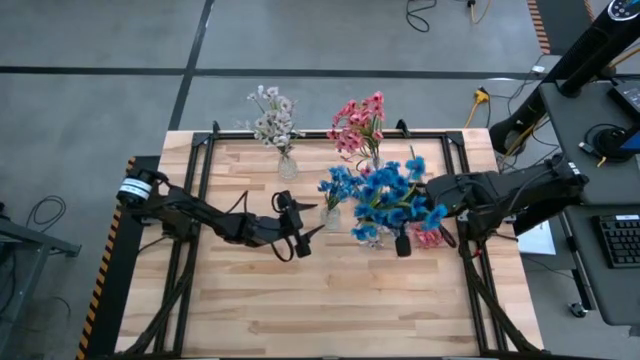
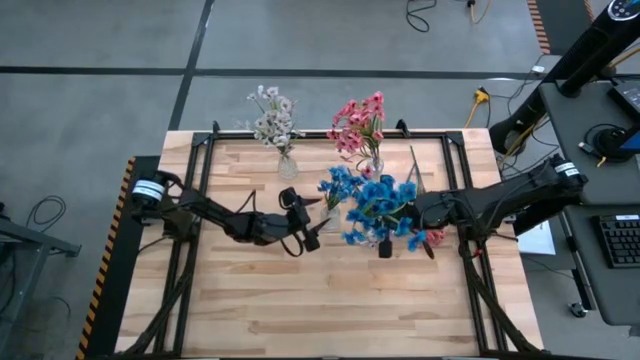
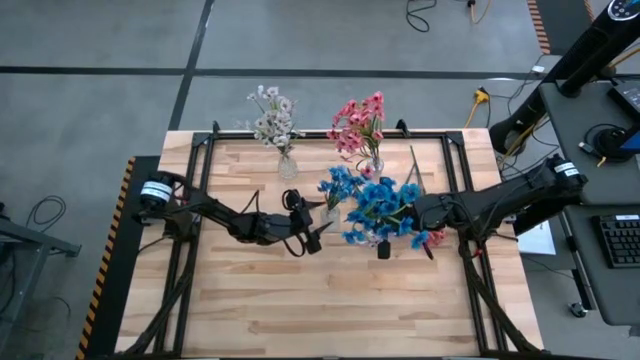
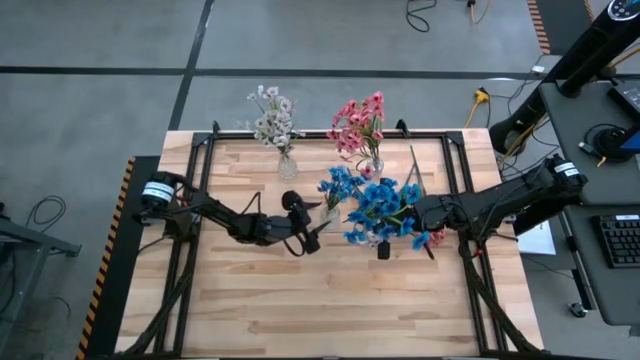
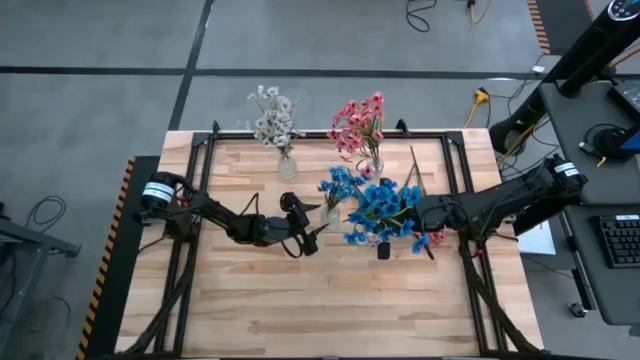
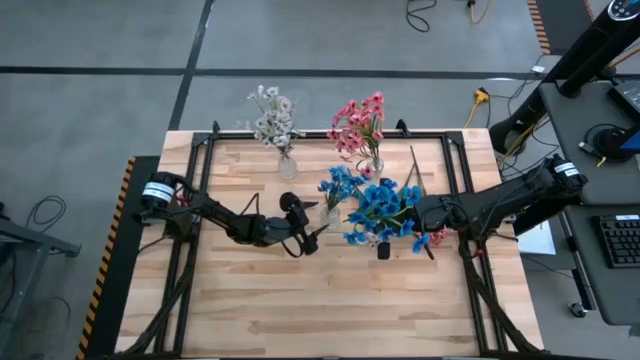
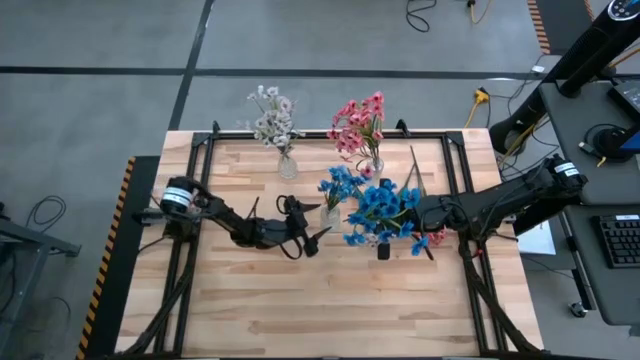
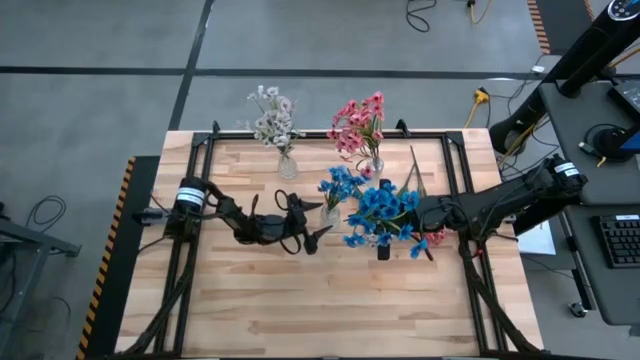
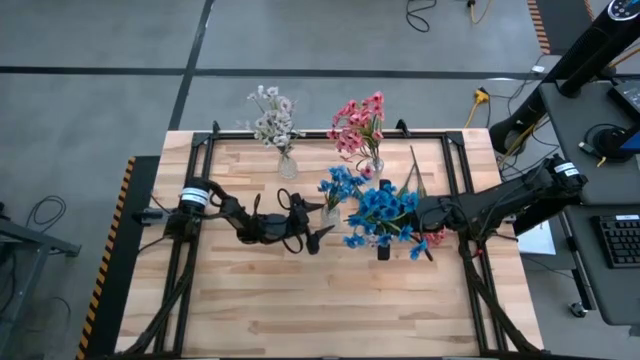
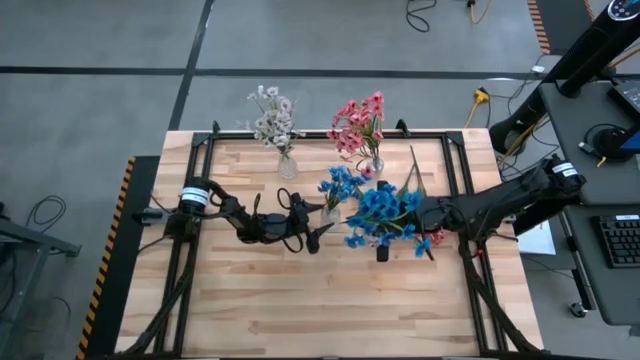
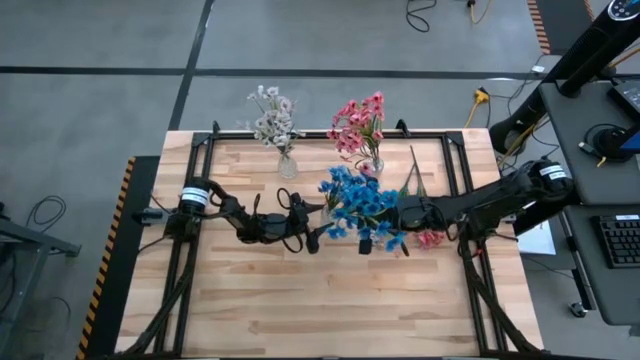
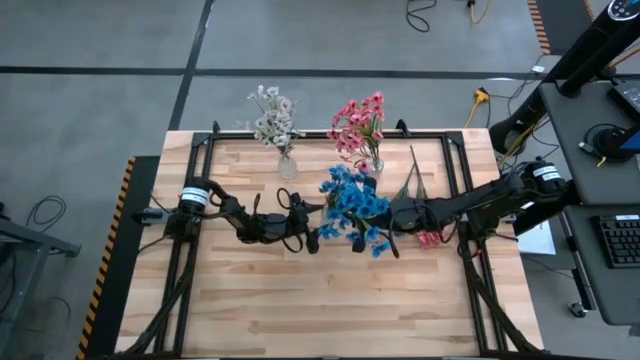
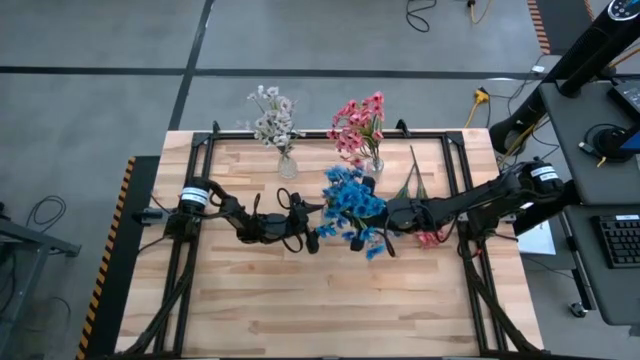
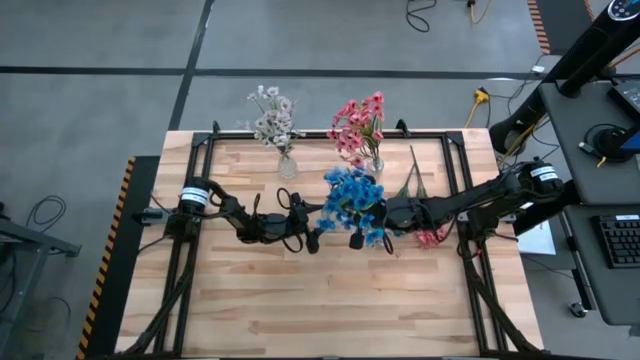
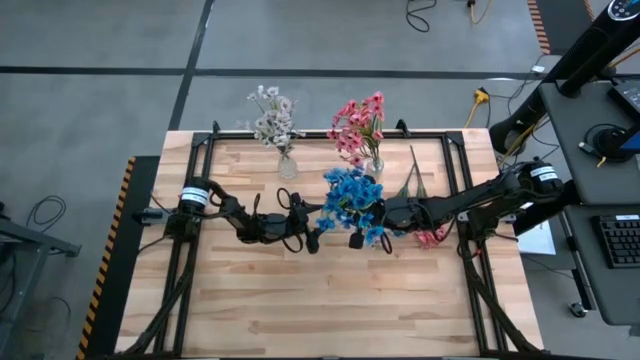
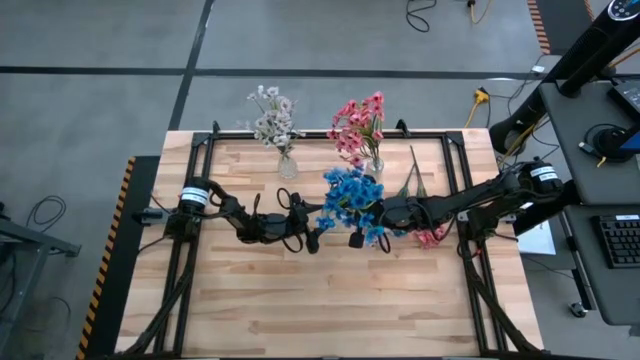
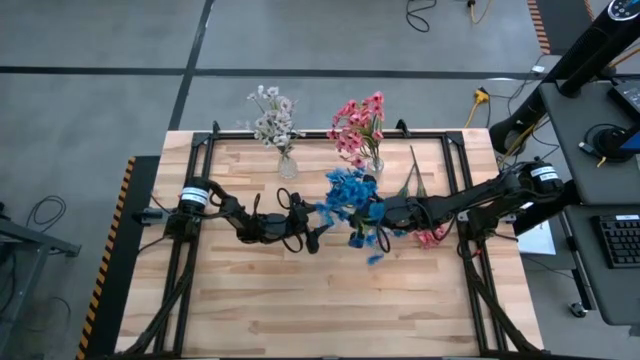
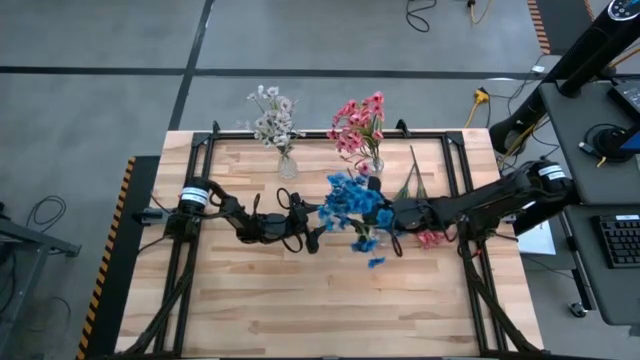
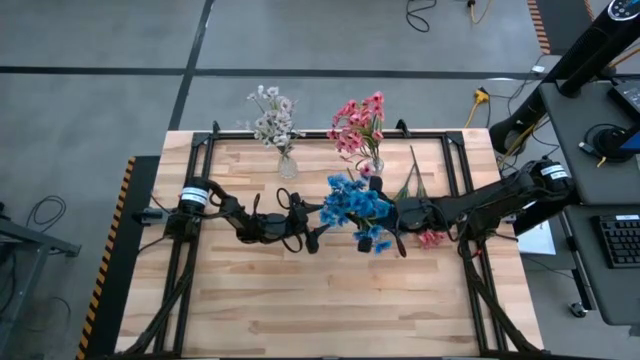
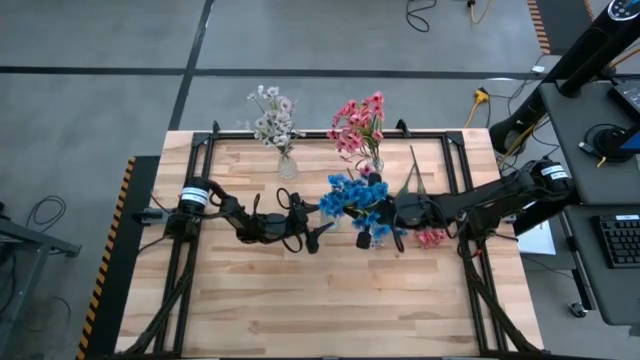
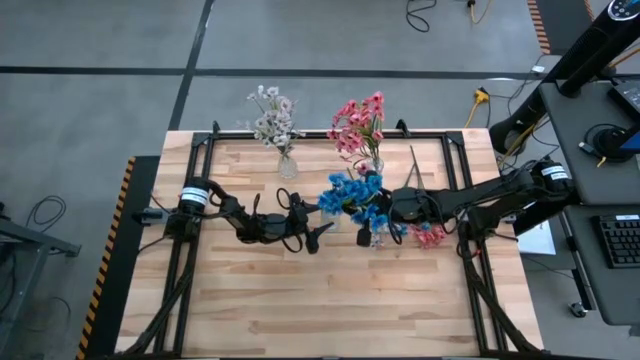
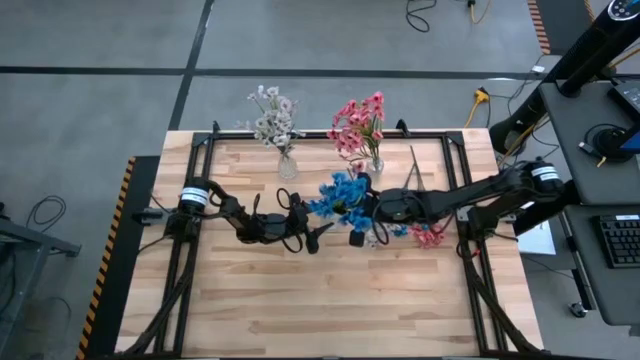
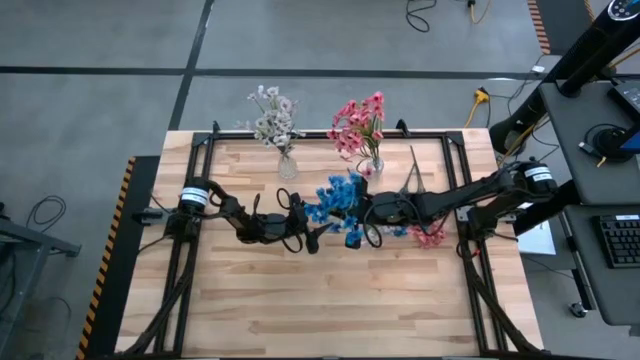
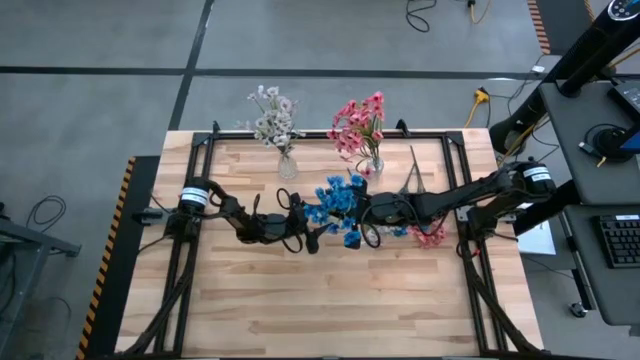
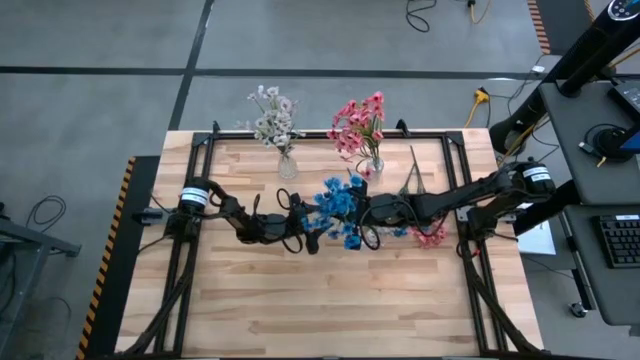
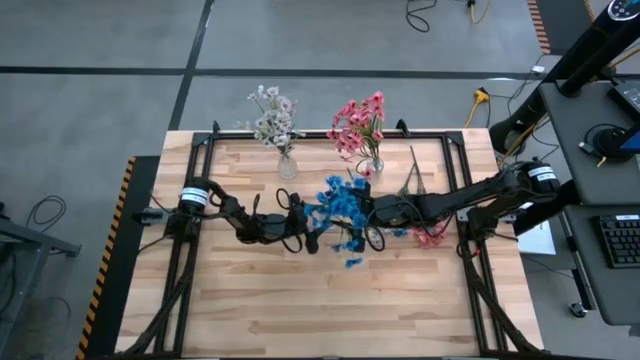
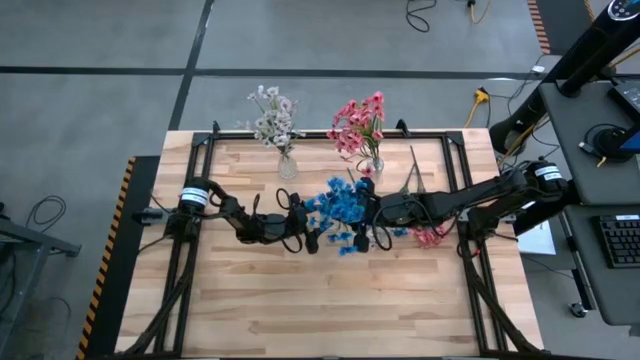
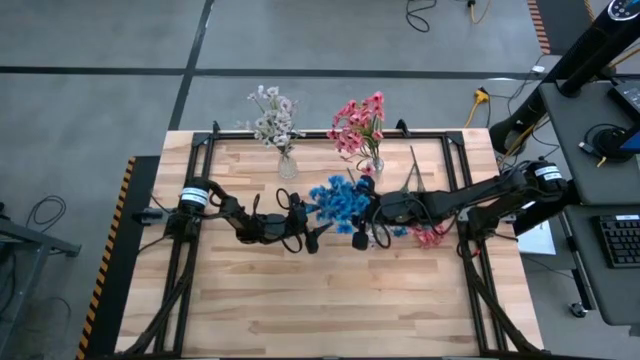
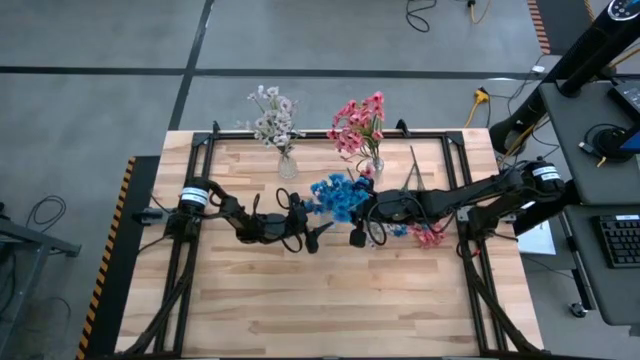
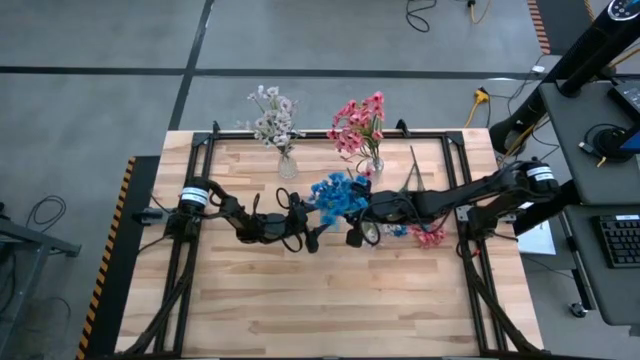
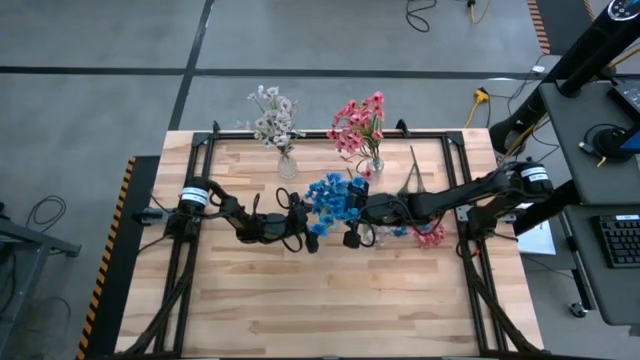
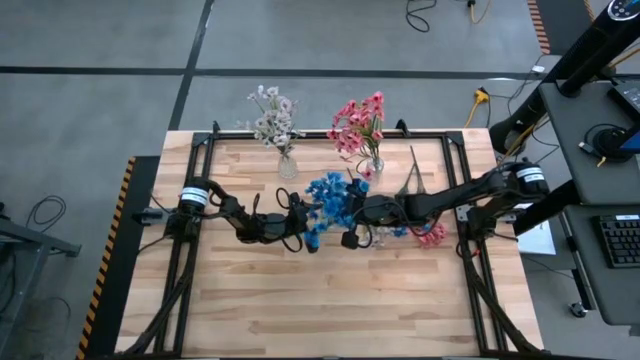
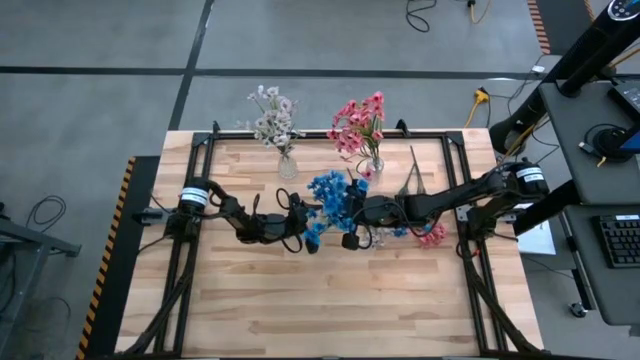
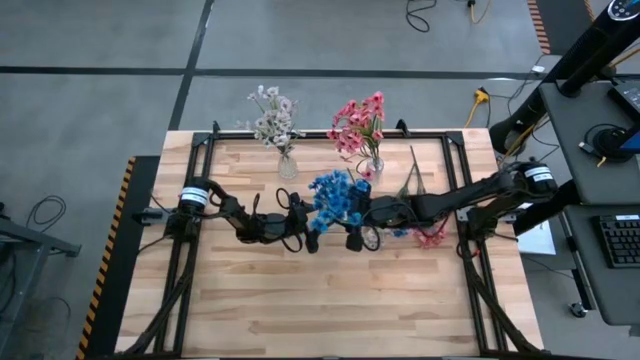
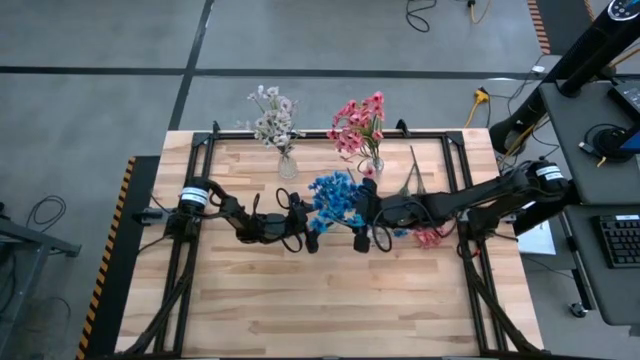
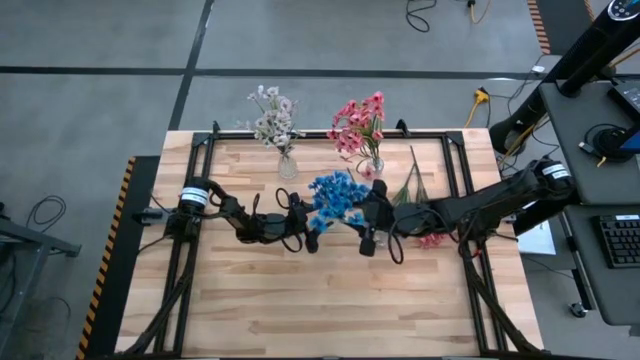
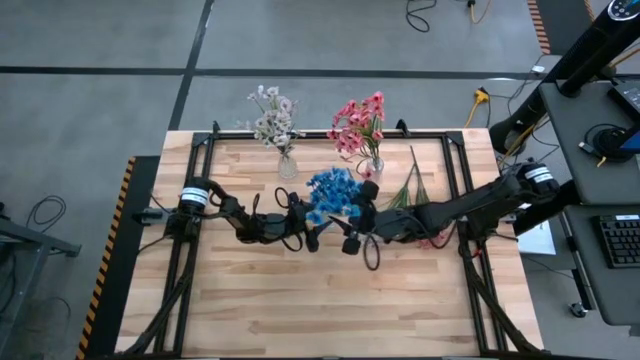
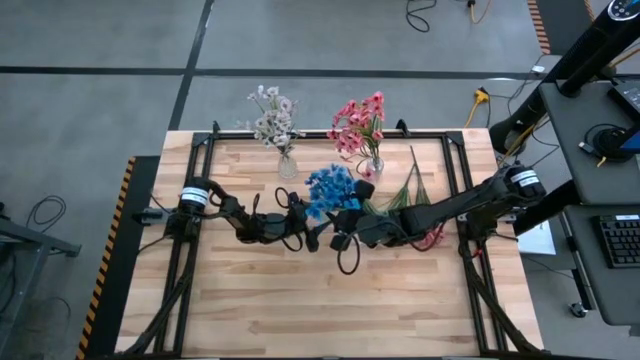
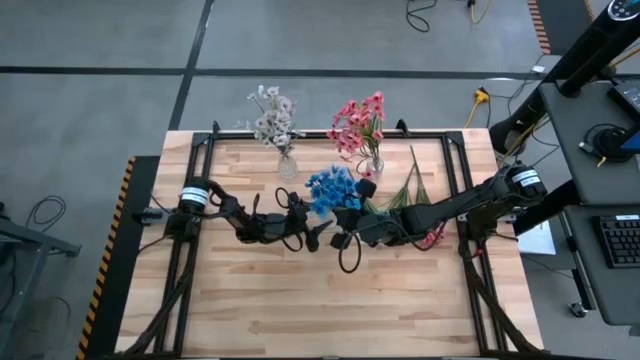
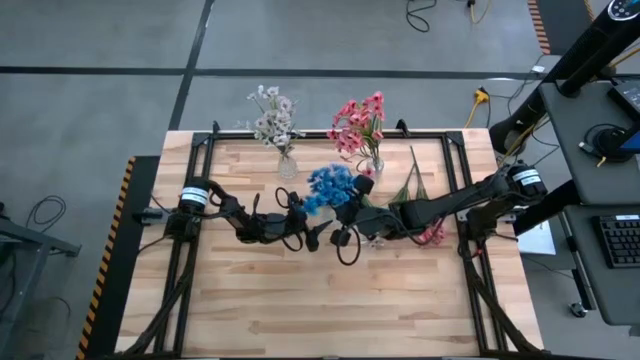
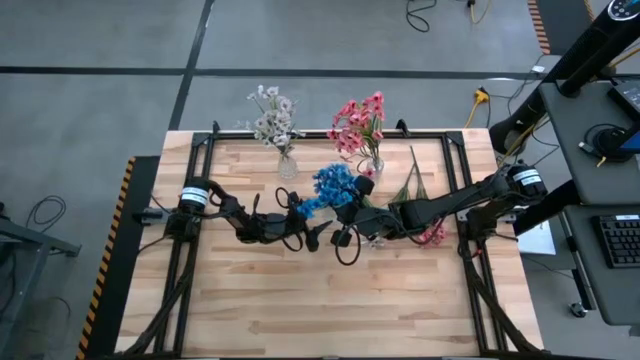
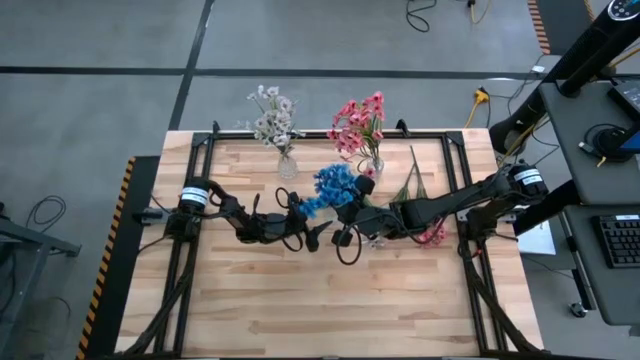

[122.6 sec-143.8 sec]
Task: Sort flowers into vase by color
Put the left blue flowers into the middle transparent vase
